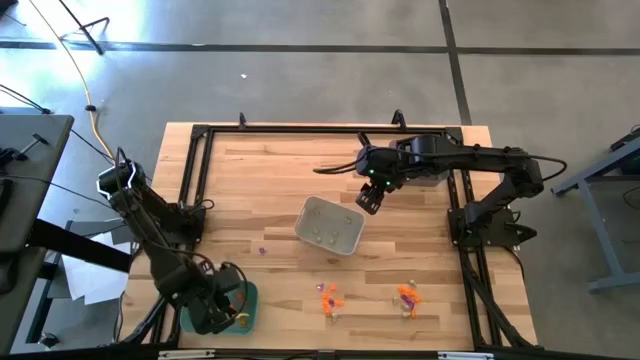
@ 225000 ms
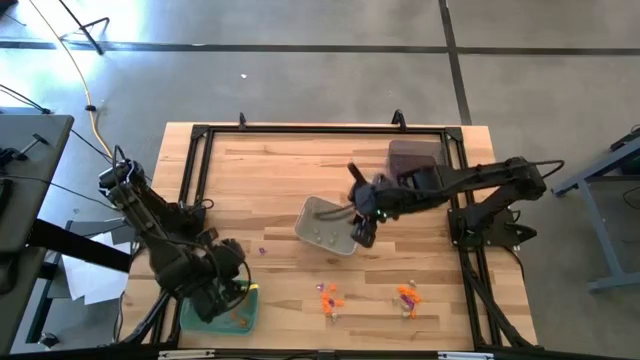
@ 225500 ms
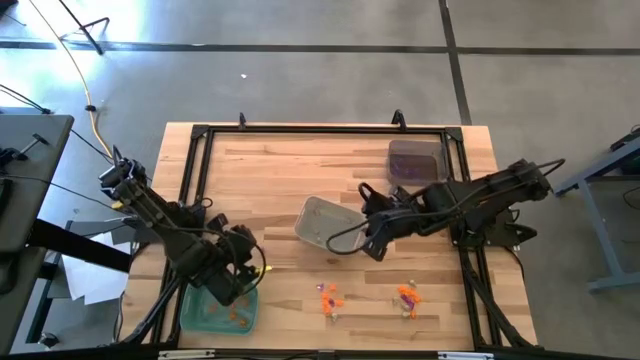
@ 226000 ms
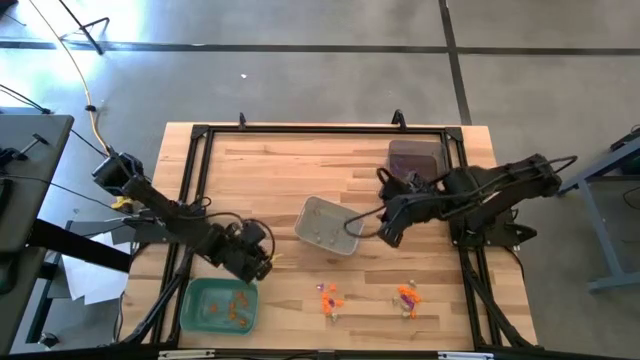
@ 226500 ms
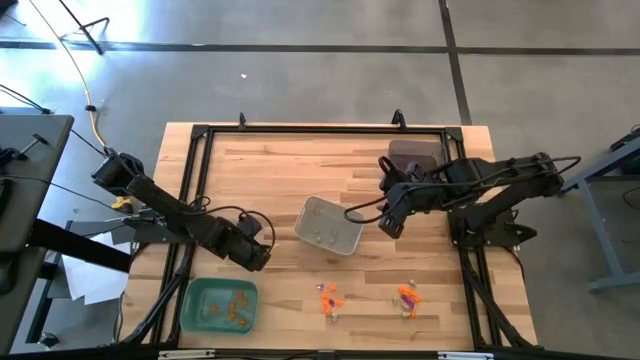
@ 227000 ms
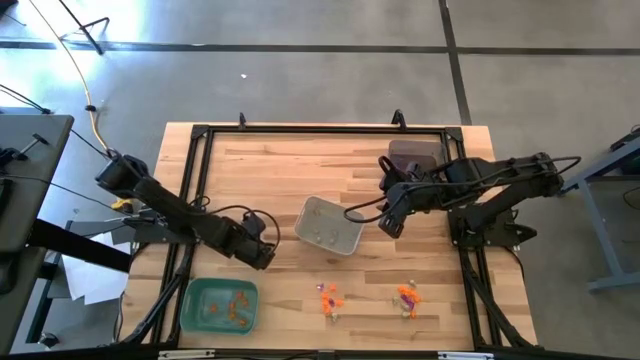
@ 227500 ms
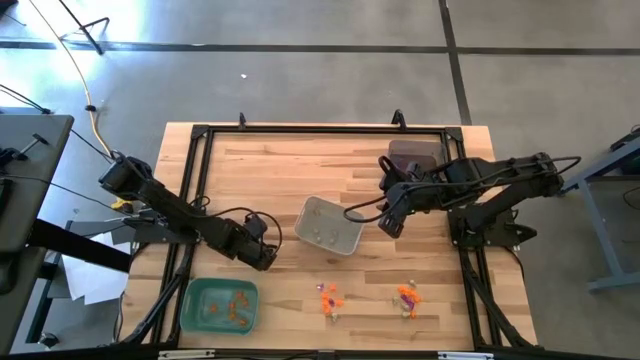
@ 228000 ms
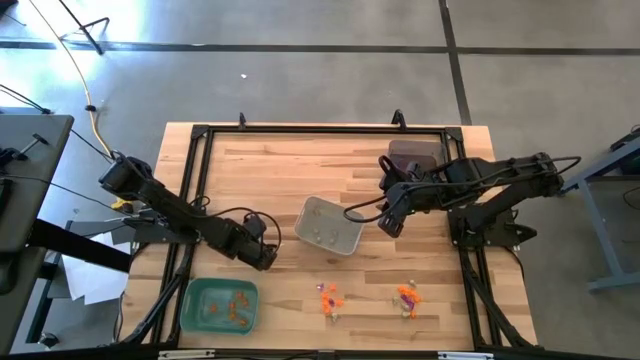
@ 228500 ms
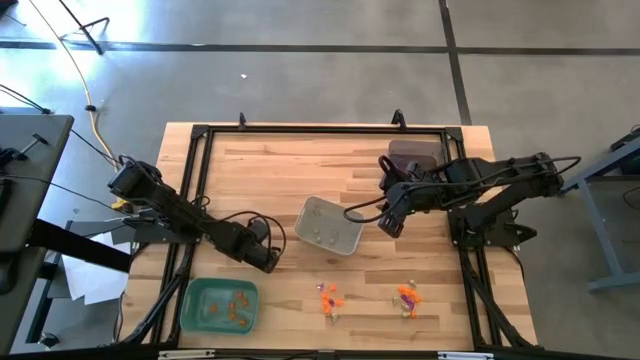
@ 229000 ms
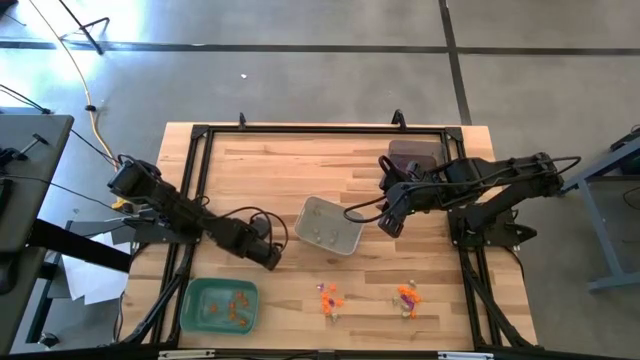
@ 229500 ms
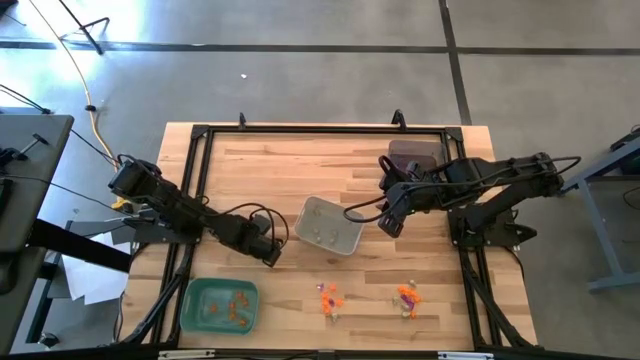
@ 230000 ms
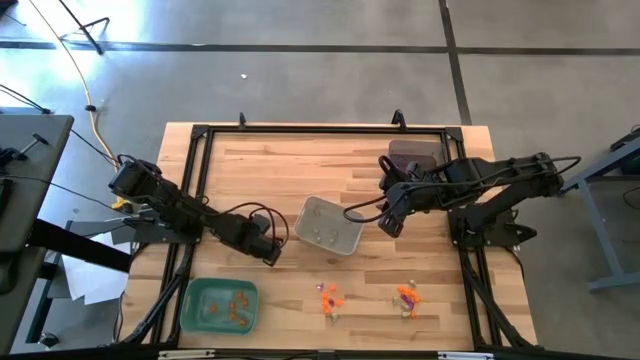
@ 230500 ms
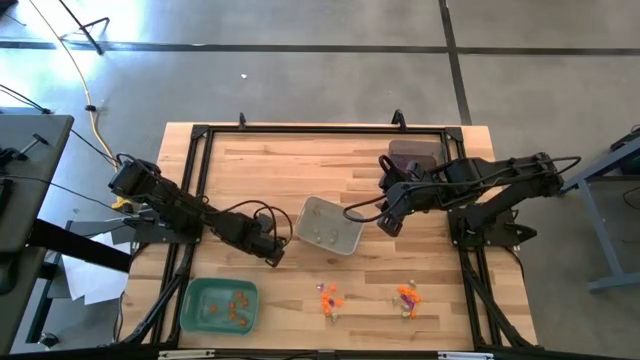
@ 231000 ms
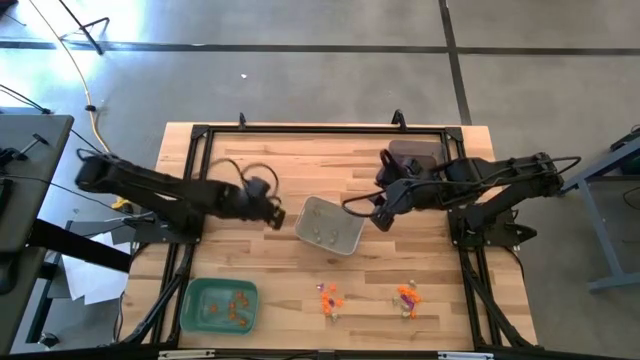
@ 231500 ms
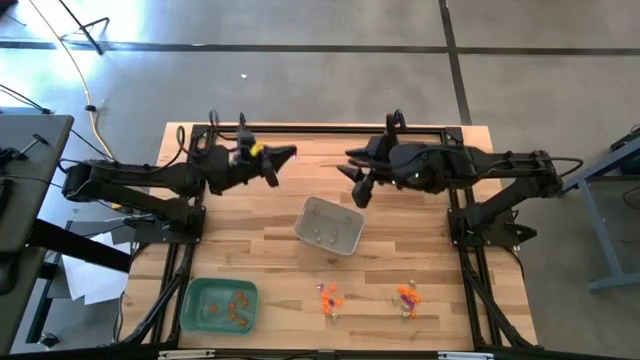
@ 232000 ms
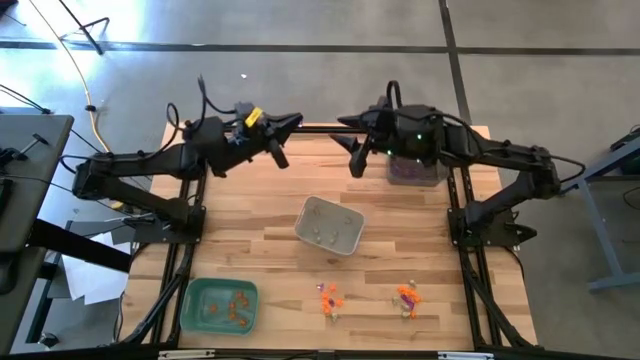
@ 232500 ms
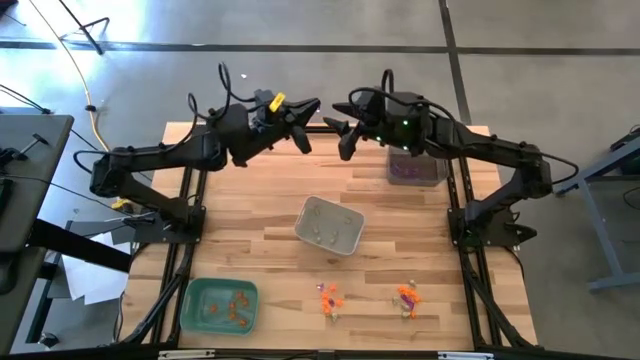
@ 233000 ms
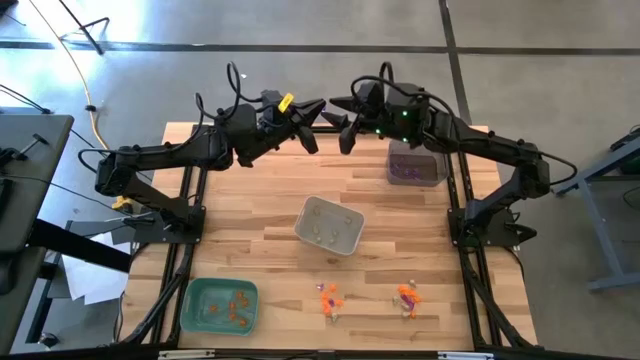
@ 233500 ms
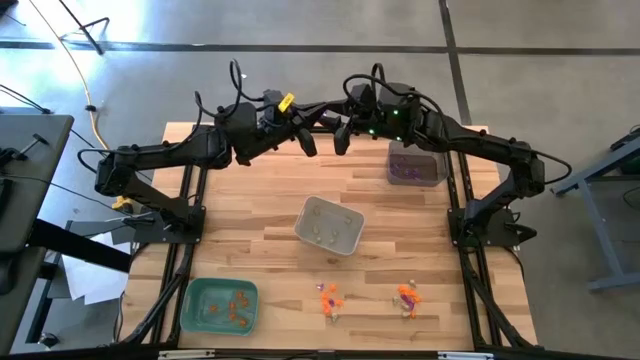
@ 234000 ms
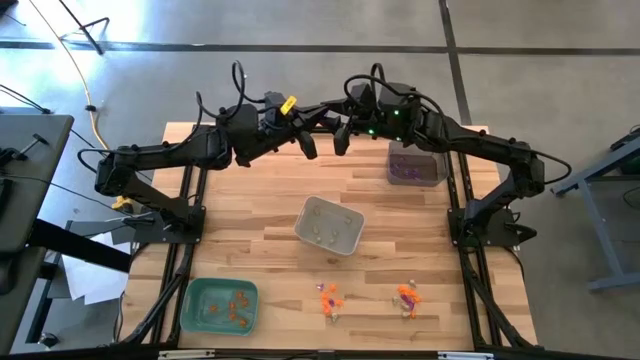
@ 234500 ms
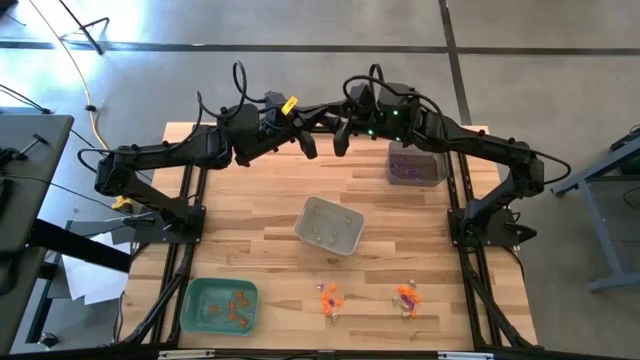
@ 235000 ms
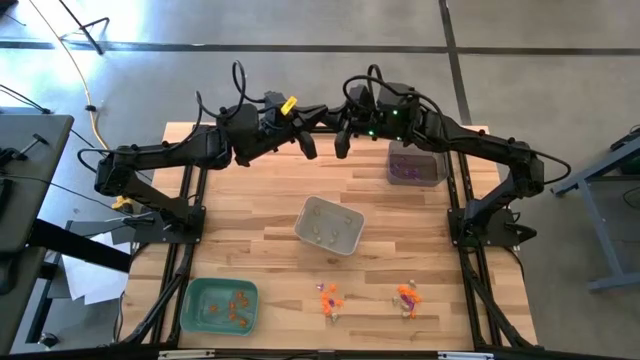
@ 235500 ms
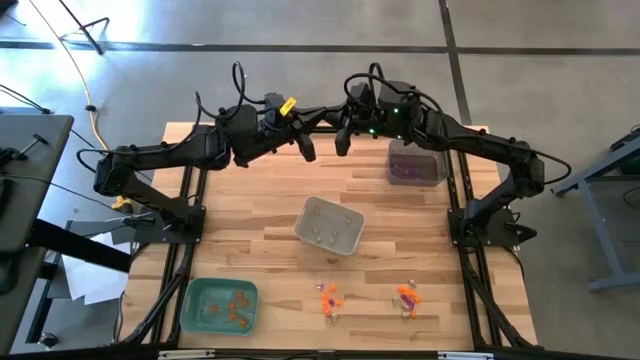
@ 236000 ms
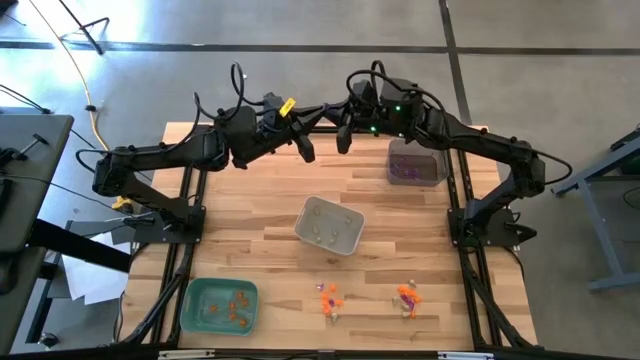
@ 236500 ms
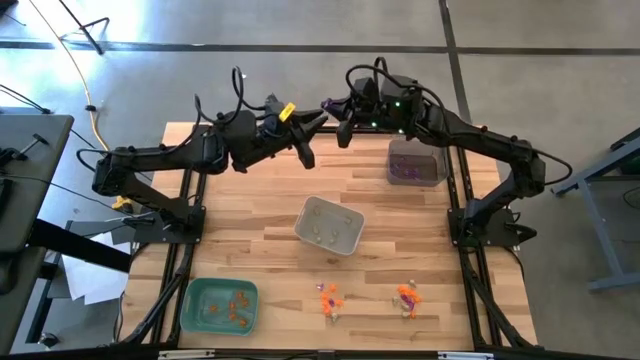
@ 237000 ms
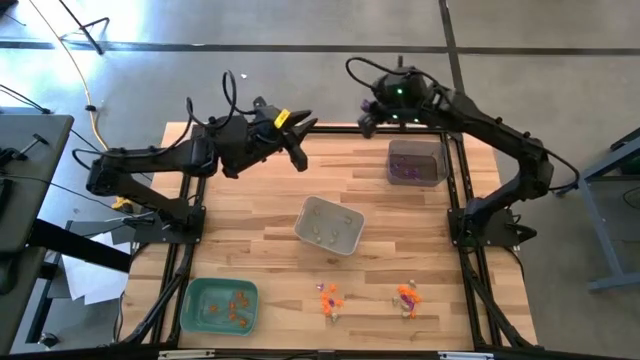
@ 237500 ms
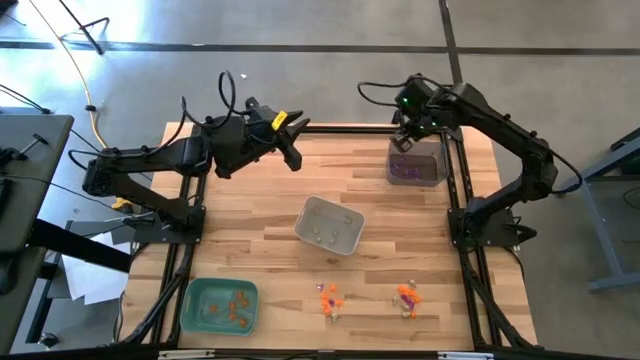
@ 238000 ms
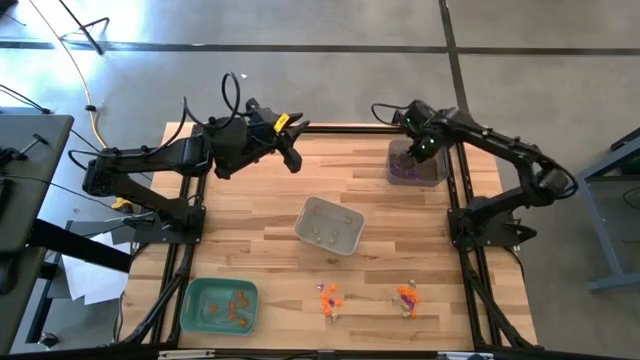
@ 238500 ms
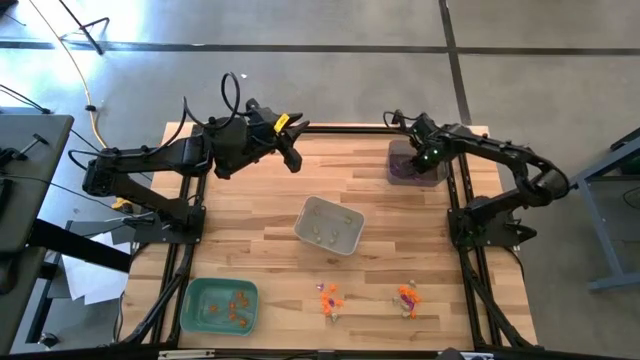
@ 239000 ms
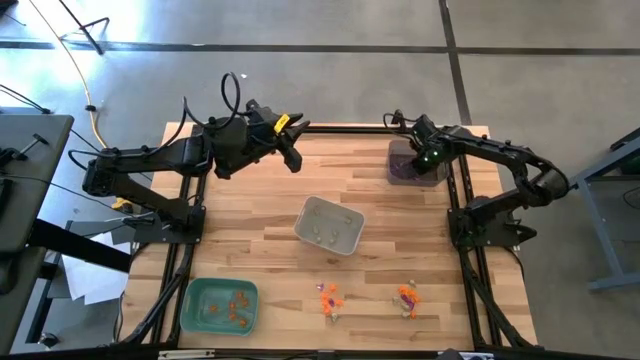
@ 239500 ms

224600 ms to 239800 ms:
Task: Sort Halloween decoration
Put the violet witch hat toy into the black bin

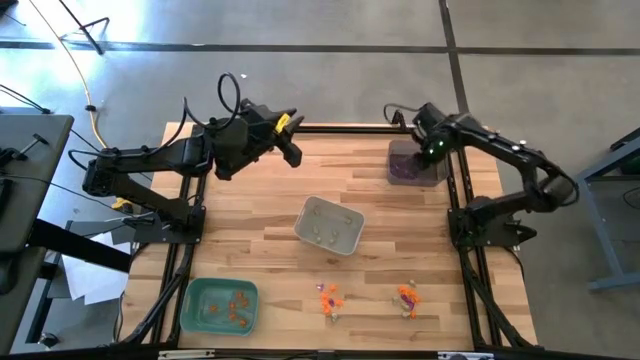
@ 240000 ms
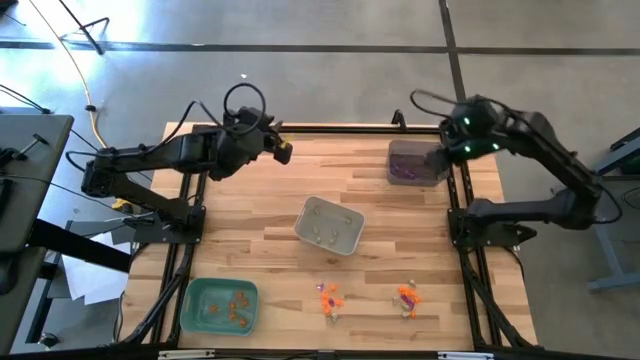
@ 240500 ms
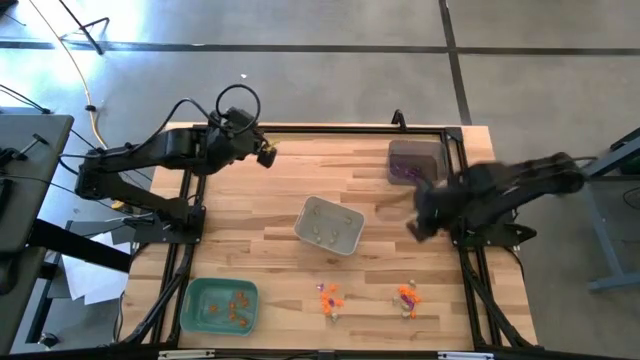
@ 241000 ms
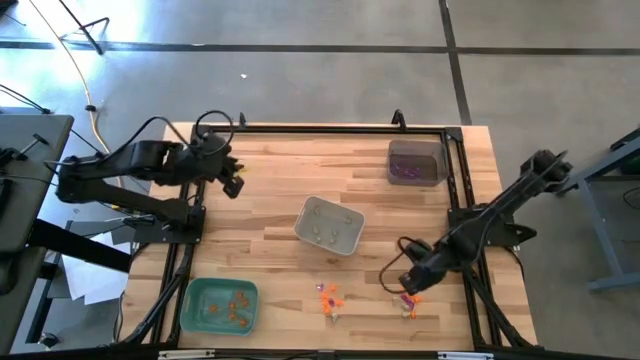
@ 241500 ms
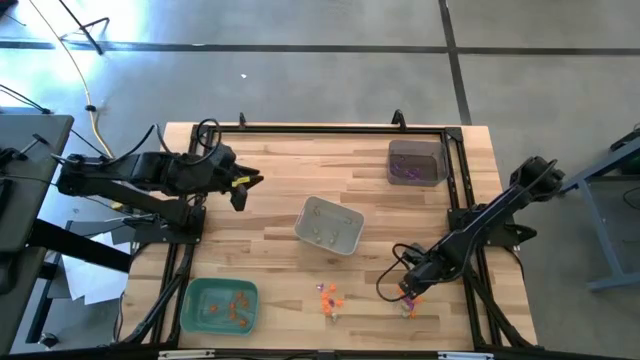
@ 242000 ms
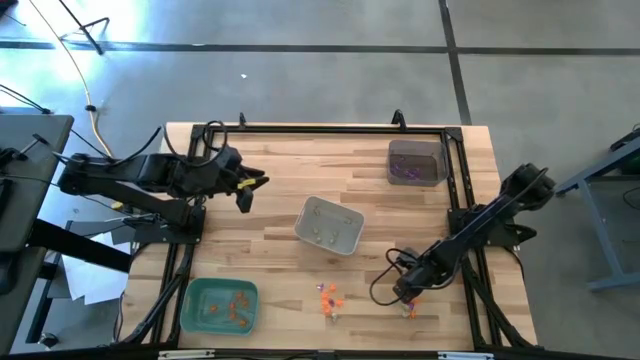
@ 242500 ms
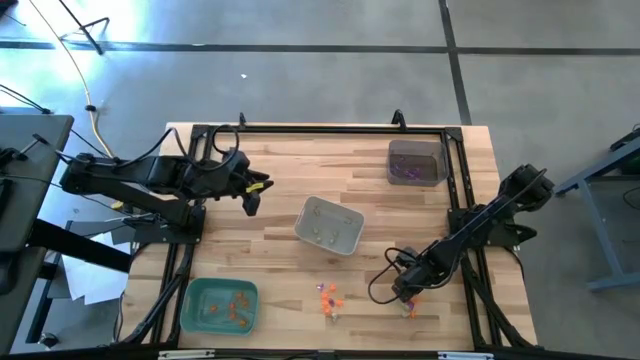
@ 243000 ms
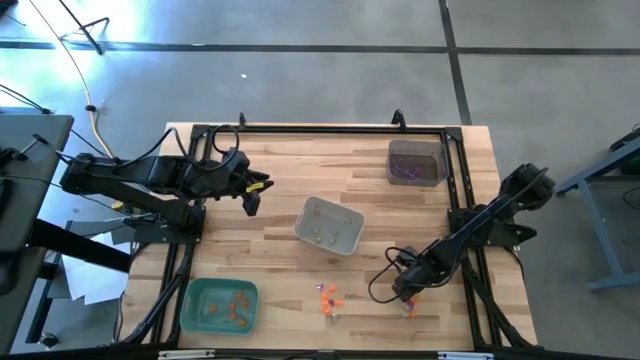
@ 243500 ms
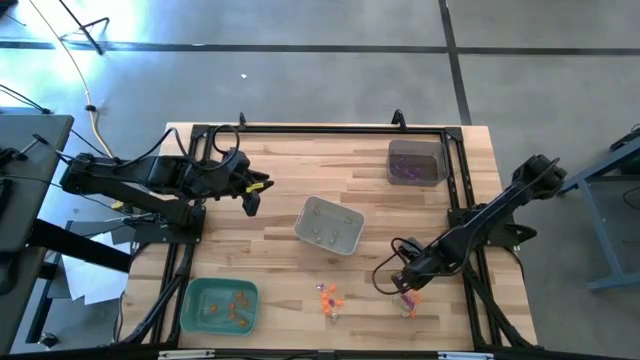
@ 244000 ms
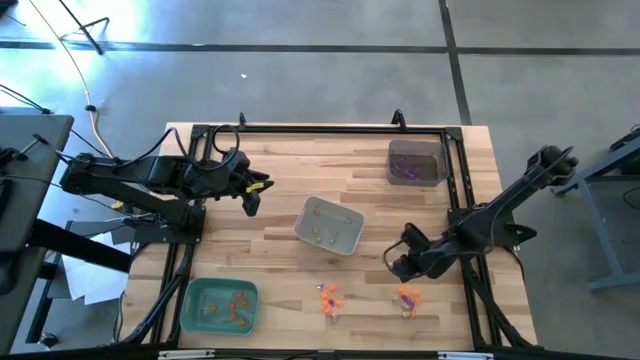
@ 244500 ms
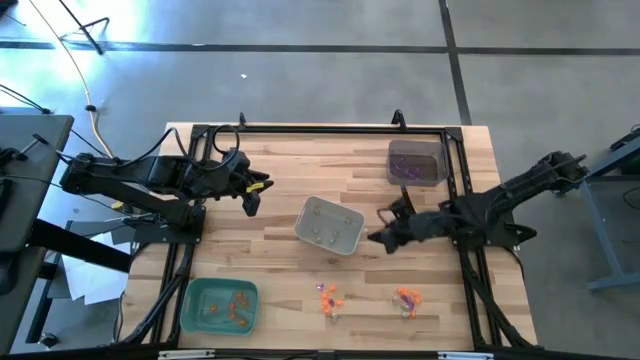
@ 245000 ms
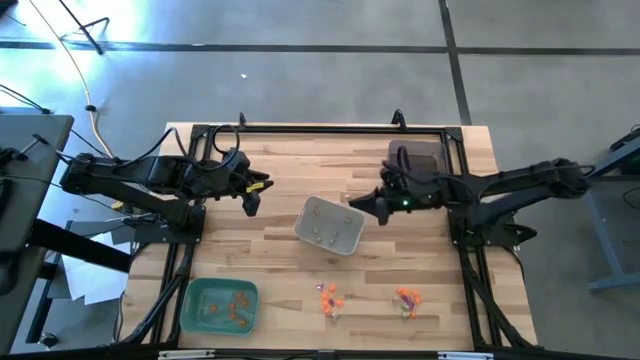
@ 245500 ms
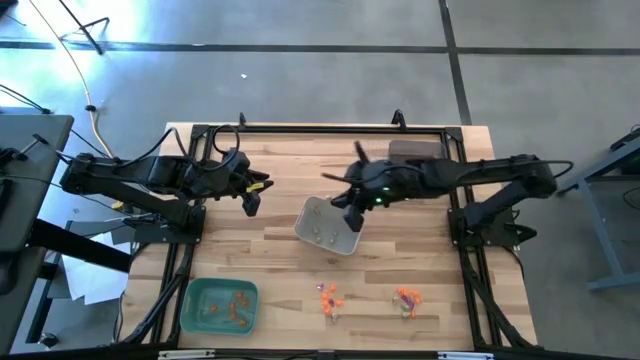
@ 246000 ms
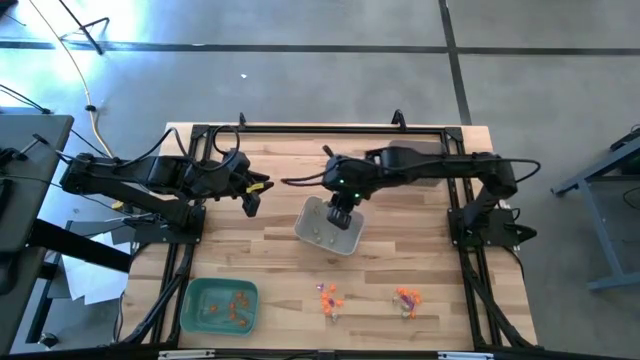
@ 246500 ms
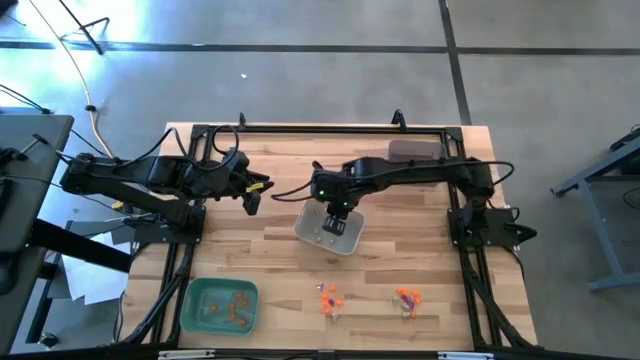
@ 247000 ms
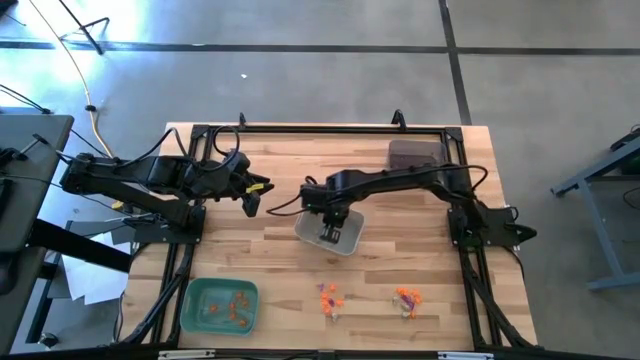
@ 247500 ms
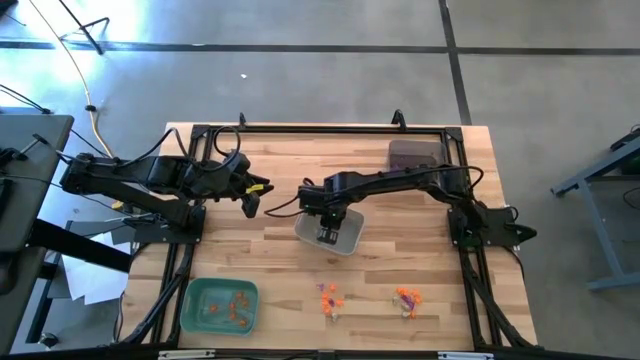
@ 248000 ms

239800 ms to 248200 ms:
Put the white skull toy into the white bin
